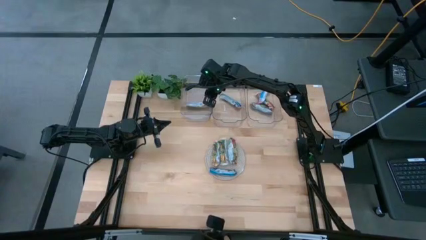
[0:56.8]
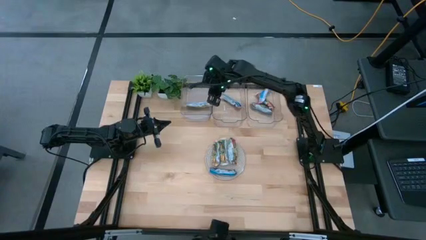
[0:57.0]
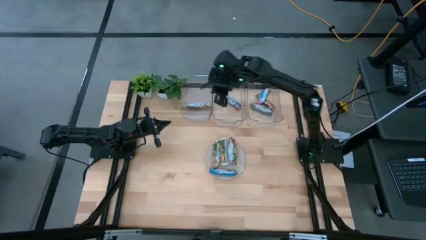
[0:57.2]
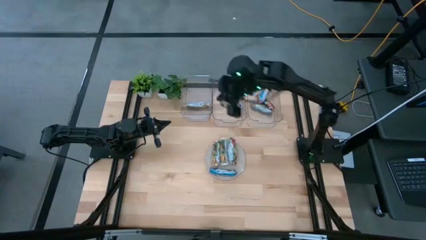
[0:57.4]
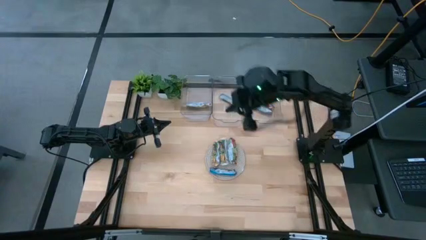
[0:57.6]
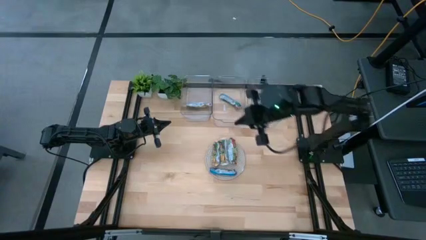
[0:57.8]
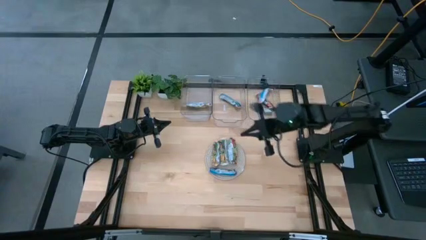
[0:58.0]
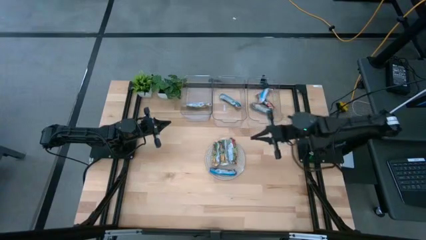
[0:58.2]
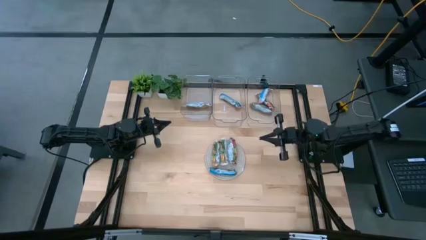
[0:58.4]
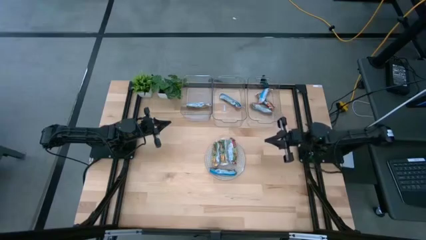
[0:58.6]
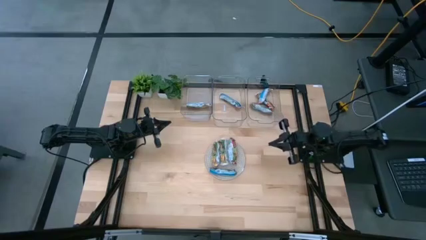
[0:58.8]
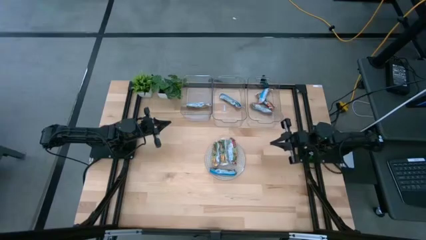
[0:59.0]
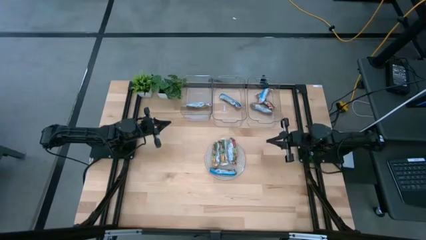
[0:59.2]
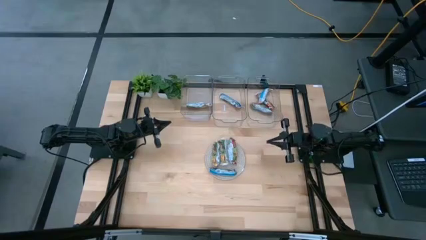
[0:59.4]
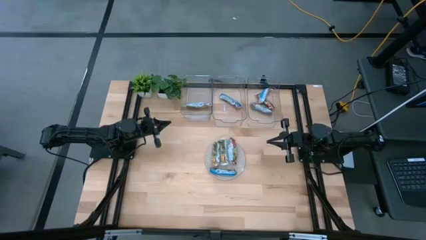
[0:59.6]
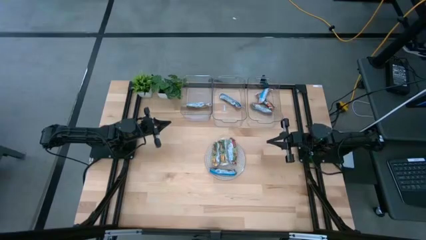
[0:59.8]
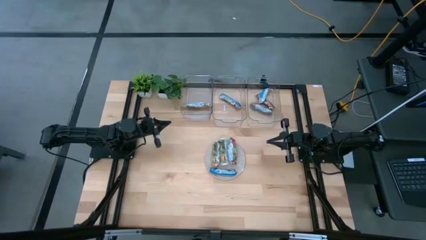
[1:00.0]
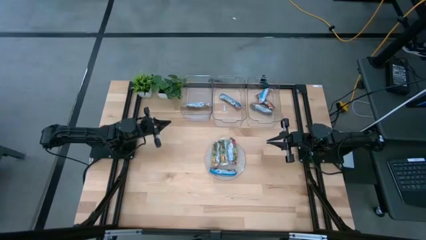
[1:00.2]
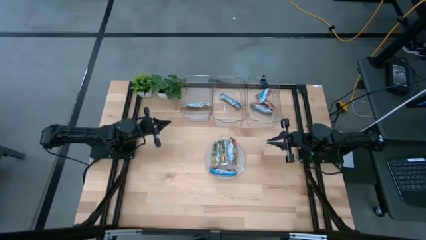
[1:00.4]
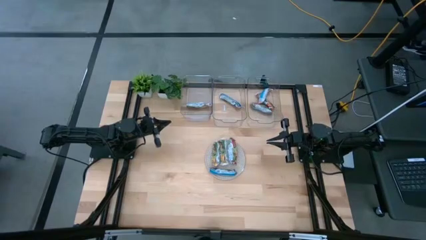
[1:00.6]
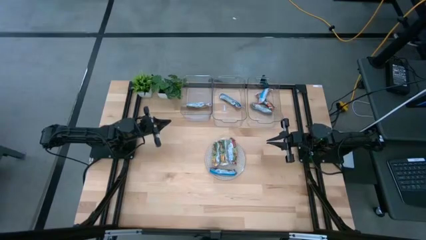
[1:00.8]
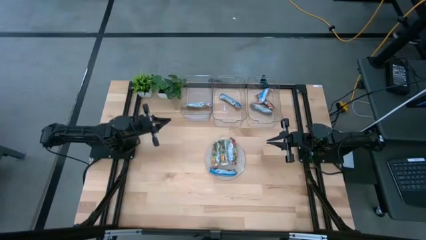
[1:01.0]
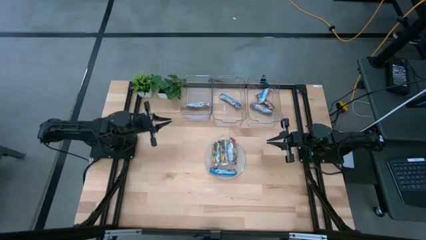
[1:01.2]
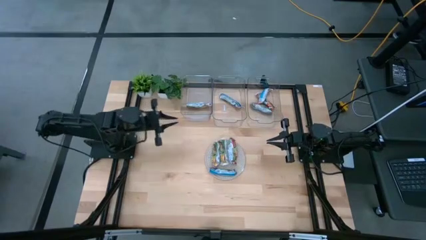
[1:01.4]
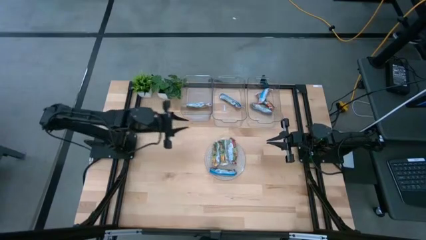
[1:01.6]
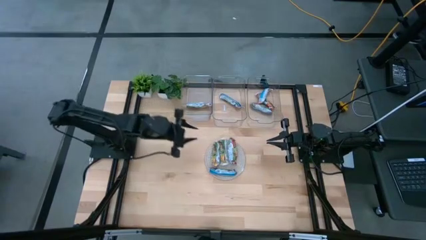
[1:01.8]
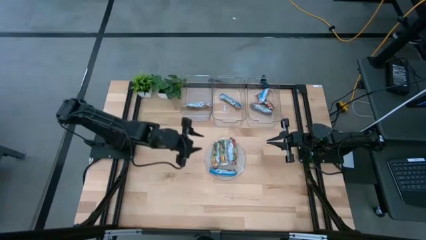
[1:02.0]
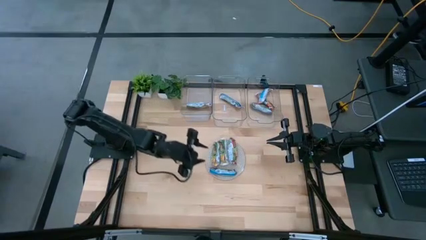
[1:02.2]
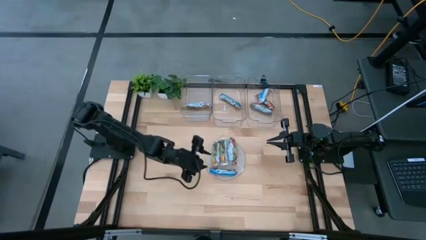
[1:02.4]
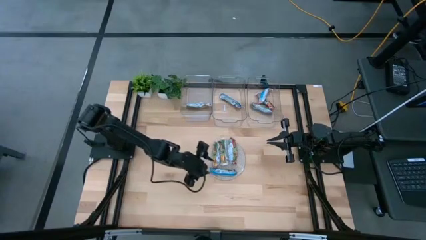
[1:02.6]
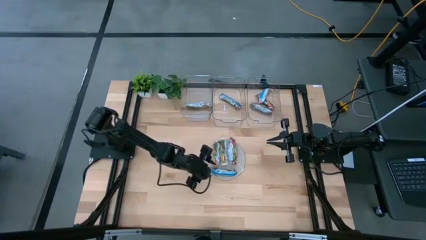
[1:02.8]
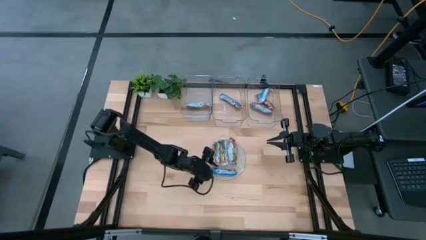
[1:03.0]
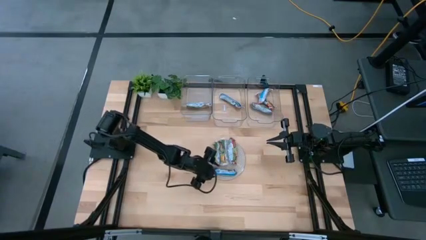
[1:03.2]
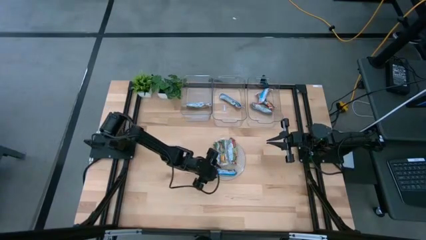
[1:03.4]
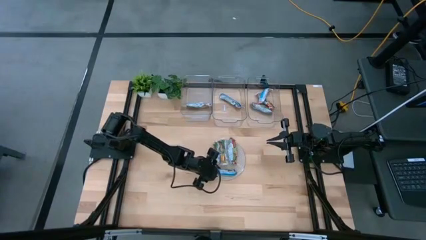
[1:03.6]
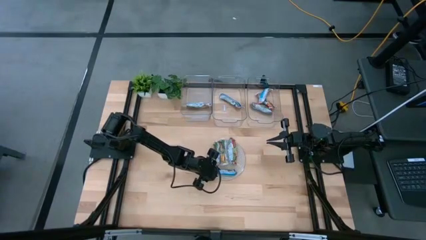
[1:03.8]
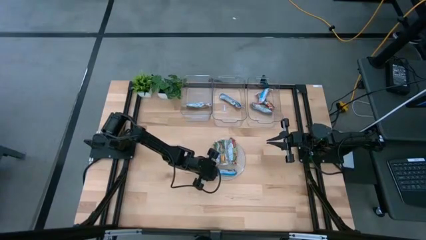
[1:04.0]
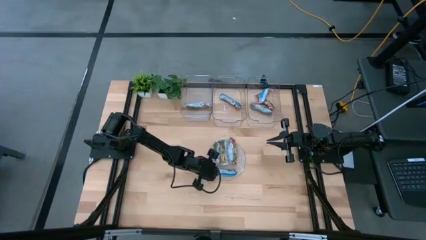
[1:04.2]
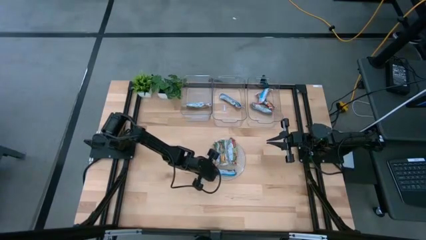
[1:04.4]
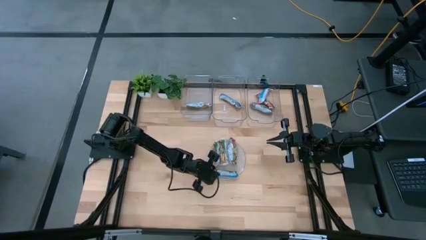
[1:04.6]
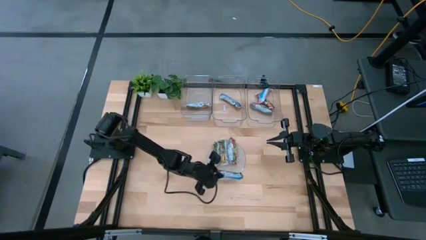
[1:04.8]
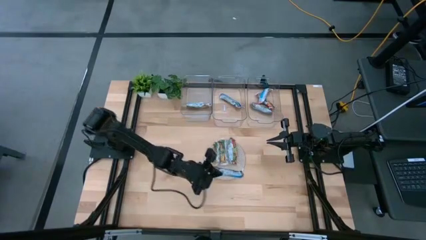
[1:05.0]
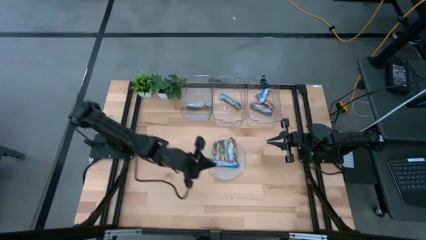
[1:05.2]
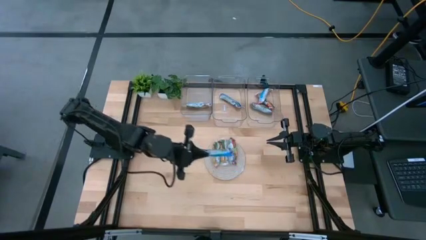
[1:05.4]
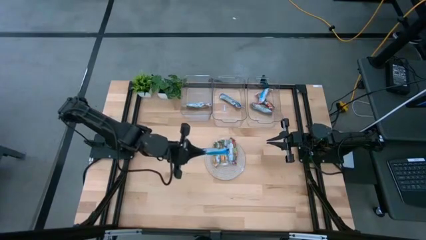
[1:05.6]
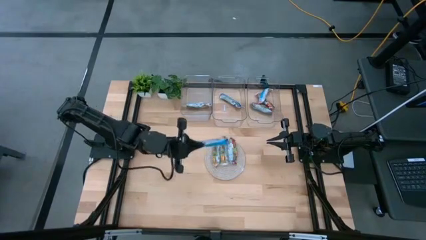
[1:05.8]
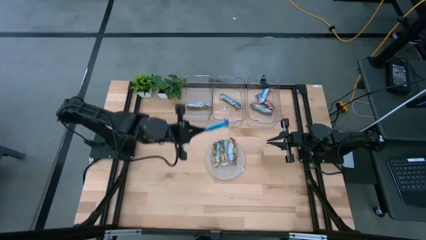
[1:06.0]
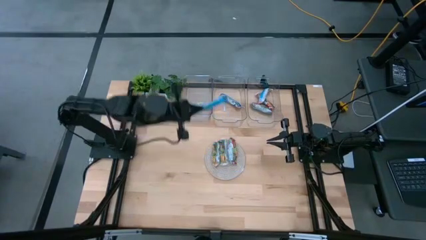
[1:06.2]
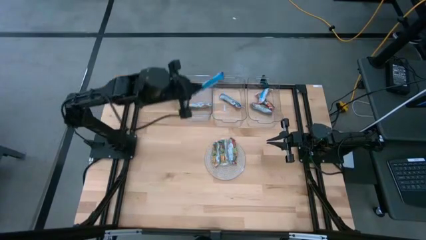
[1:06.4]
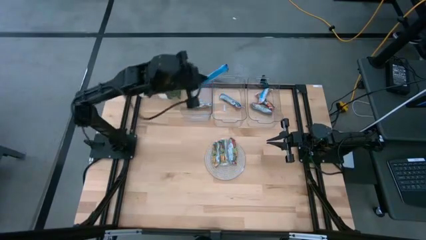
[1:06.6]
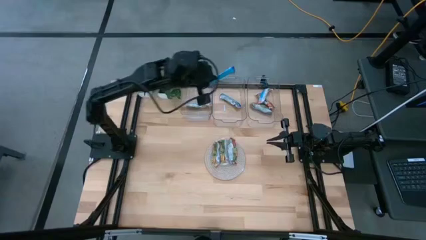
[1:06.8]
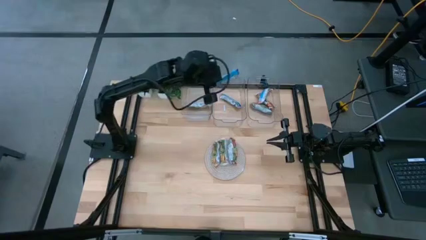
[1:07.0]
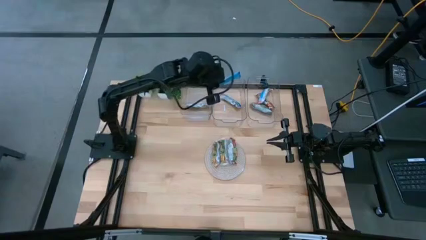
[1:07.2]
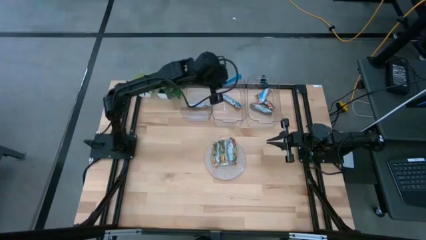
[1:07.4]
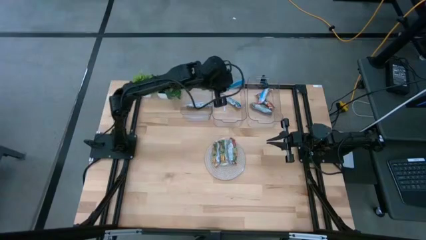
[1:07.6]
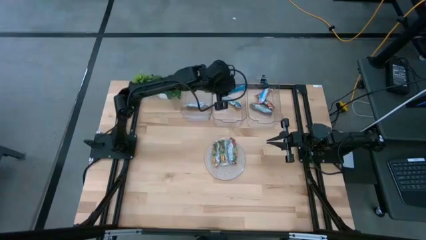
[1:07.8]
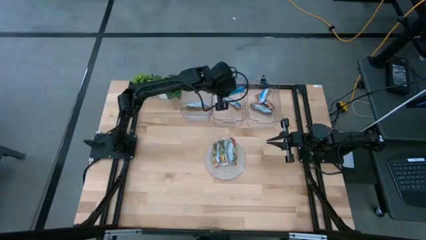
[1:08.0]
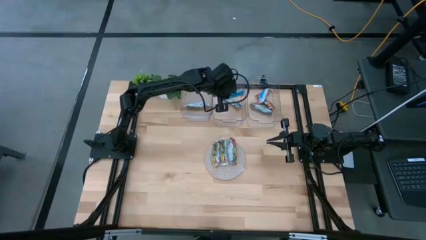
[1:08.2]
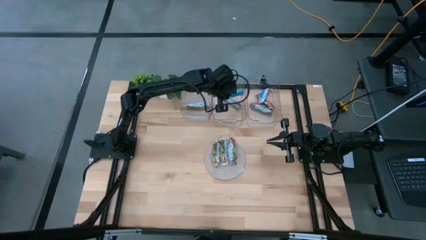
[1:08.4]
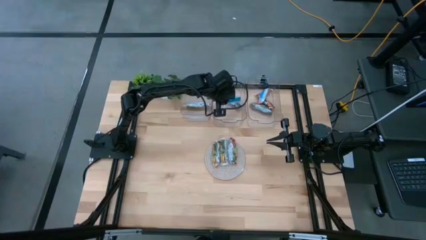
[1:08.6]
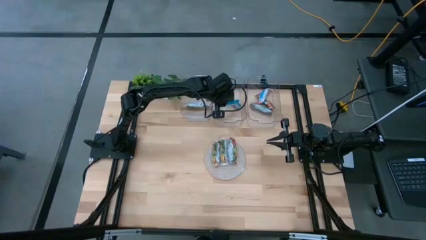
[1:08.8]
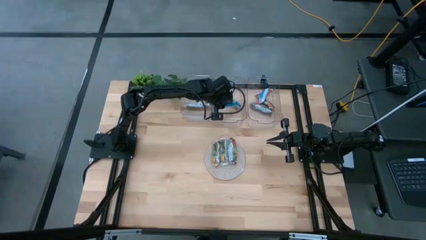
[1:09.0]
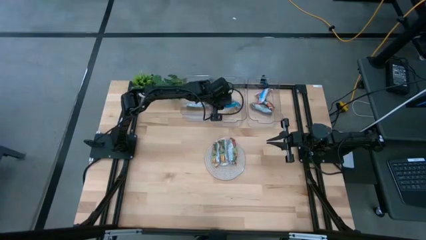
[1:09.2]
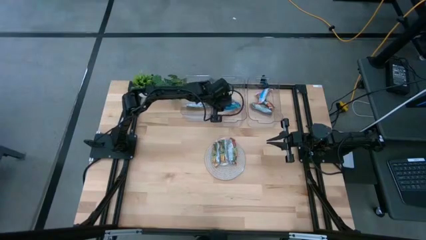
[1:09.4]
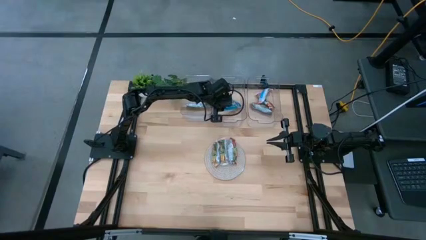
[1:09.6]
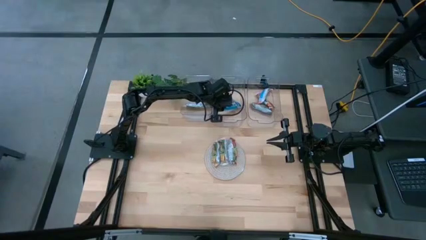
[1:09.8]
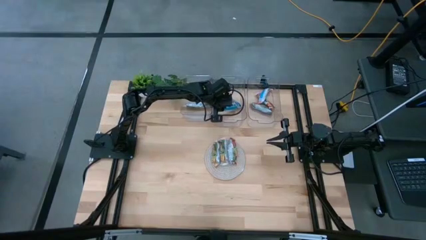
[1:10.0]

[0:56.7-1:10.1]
Task: Pick and place Granola Bars by type
Put the blue granola bar into the middle transparent bin

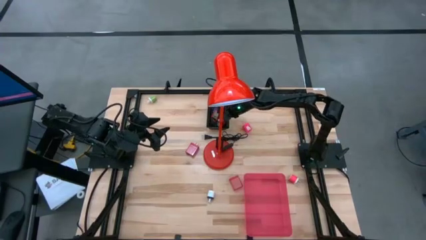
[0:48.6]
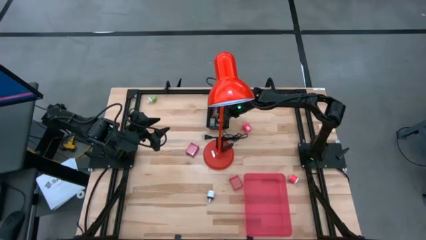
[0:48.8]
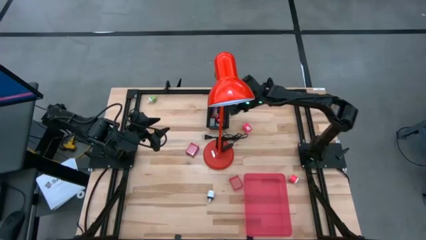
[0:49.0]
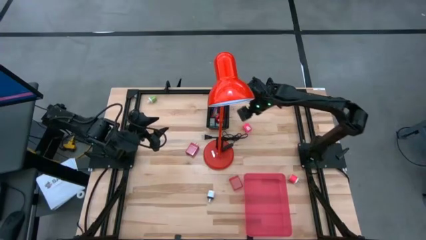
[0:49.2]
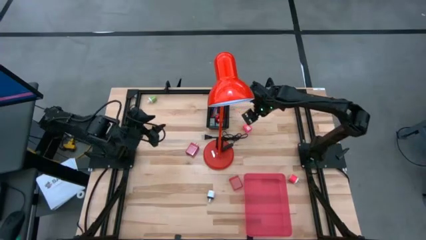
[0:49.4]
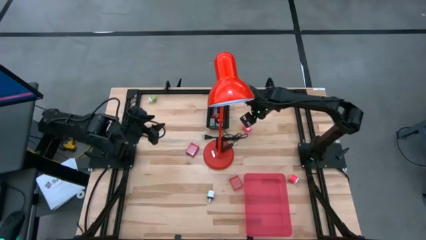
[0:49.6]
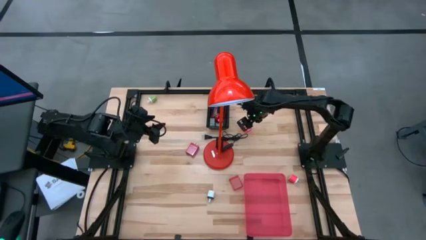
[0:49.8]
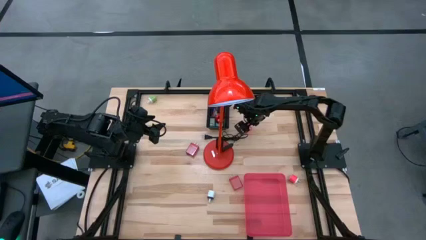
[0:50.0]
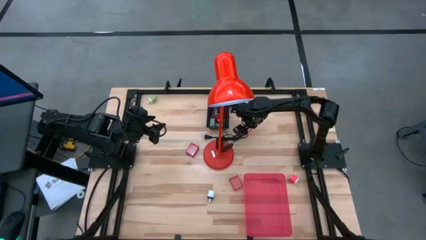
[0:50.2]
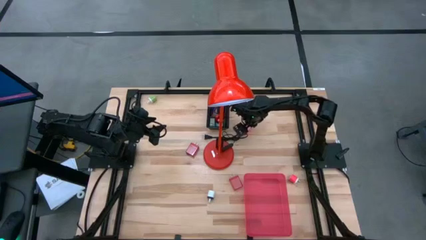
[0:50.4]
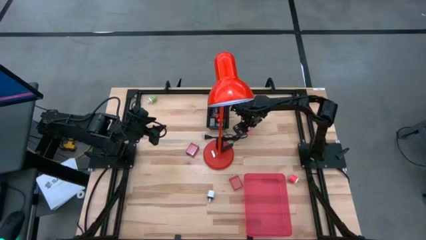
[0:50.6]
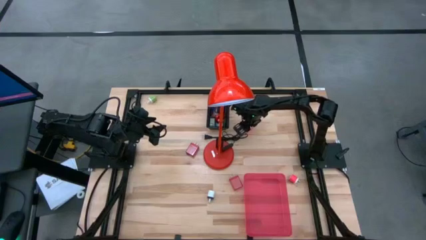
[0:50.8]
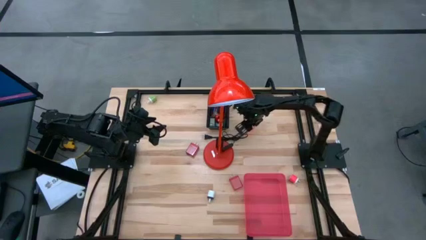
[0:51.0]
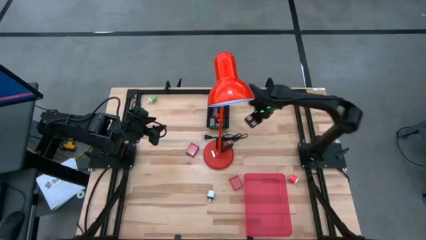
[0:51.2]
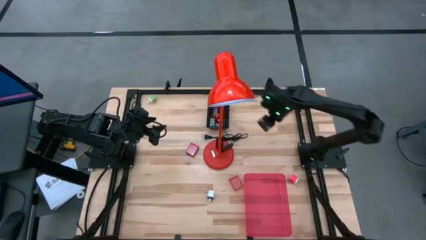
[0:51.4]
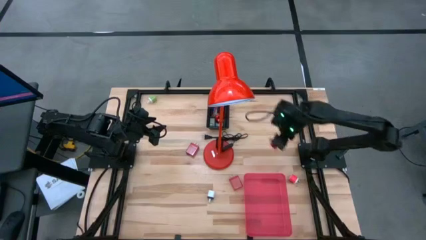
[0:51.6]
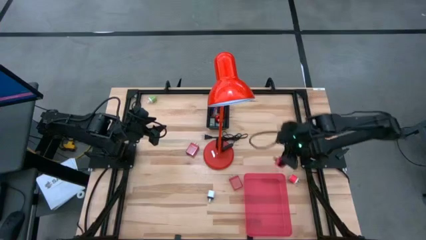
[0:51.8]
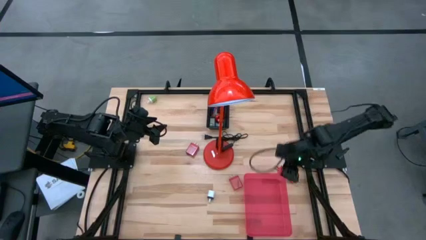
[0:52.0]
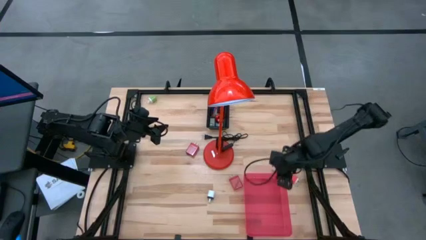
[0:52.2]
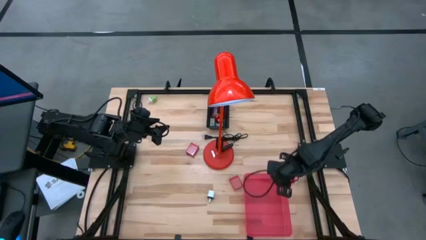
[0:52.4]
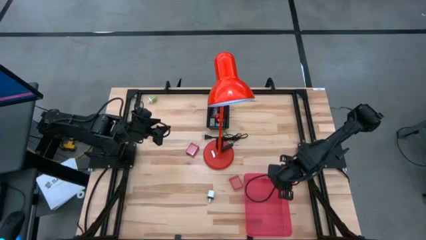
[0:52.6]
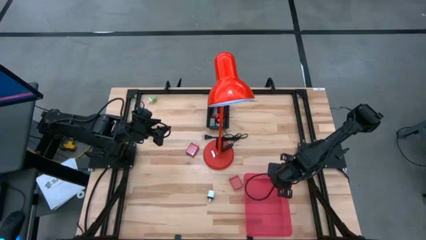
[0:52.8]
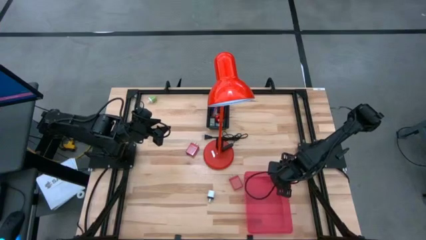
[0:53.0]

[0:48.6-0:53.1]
Task: Pick & Place Office items
Put the pink charger adapter into the red bin
